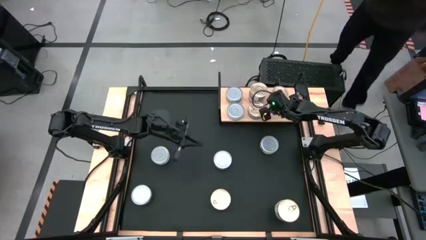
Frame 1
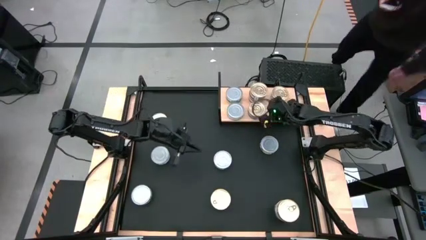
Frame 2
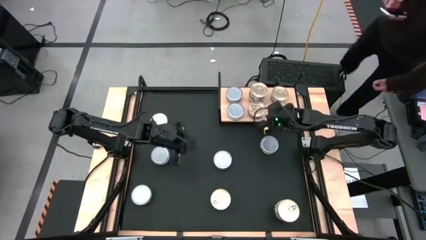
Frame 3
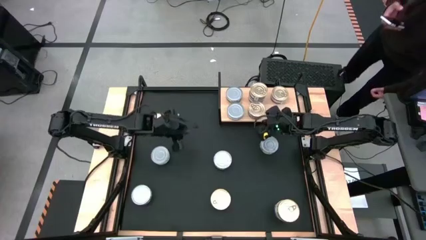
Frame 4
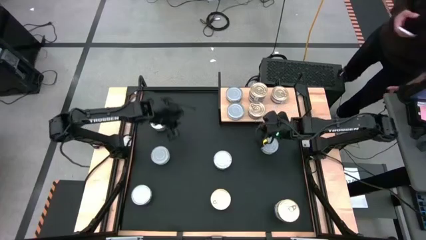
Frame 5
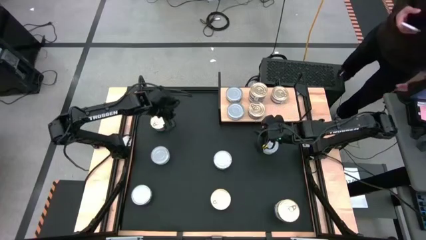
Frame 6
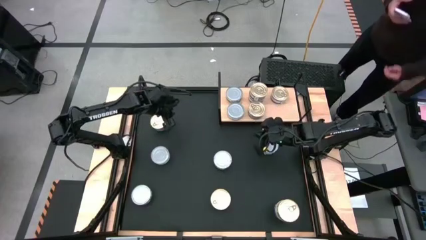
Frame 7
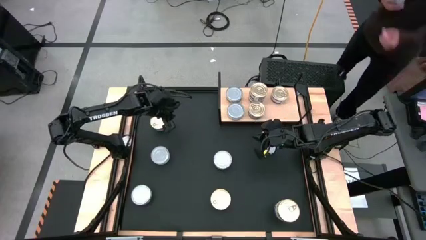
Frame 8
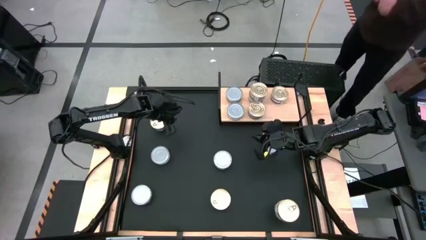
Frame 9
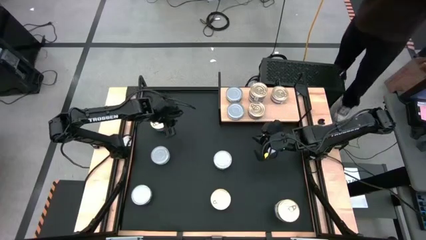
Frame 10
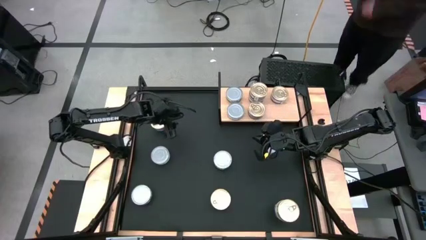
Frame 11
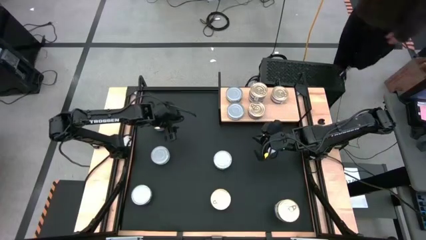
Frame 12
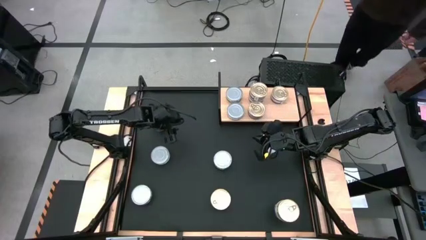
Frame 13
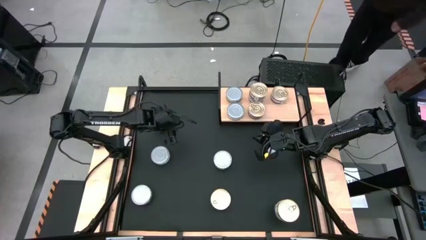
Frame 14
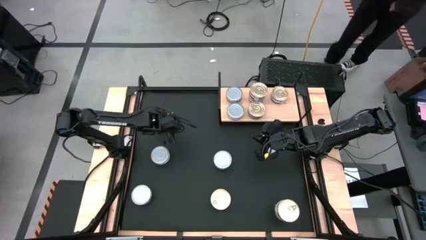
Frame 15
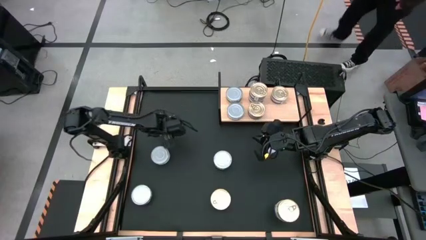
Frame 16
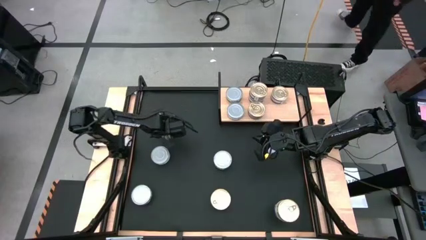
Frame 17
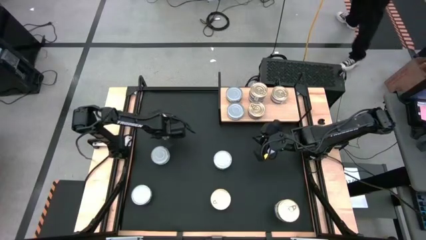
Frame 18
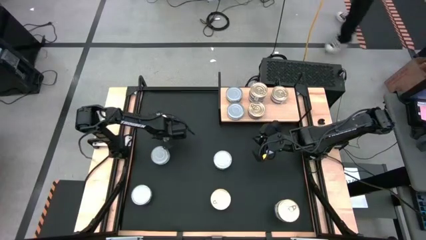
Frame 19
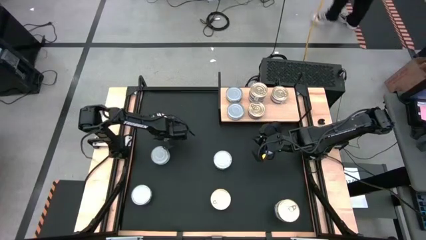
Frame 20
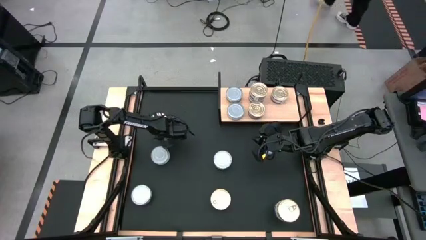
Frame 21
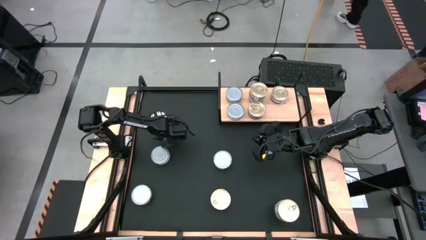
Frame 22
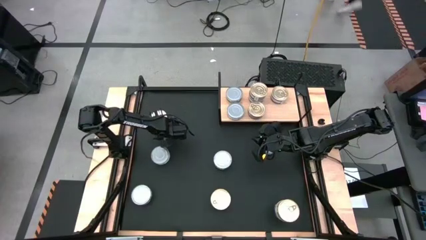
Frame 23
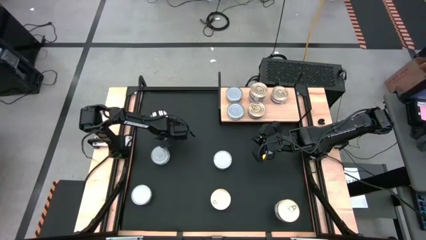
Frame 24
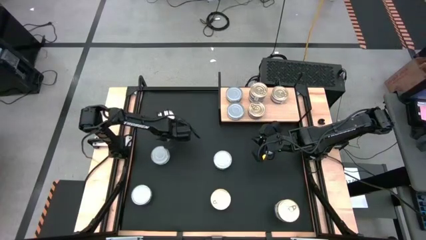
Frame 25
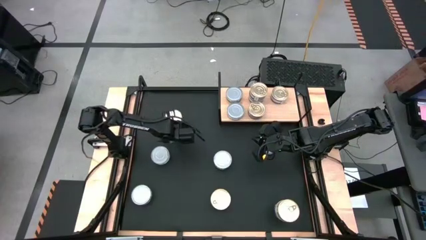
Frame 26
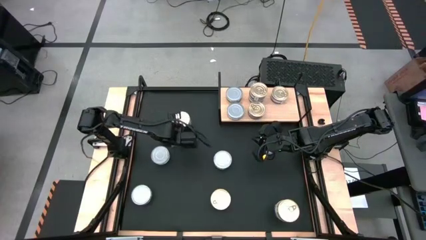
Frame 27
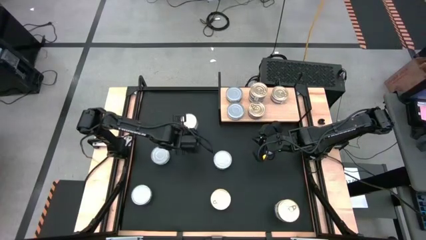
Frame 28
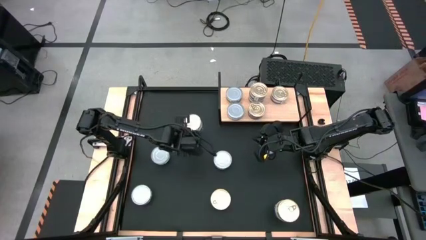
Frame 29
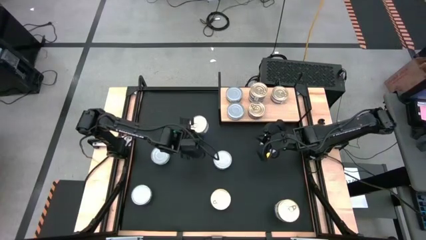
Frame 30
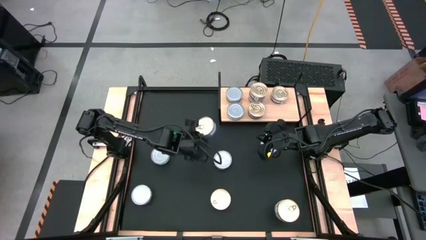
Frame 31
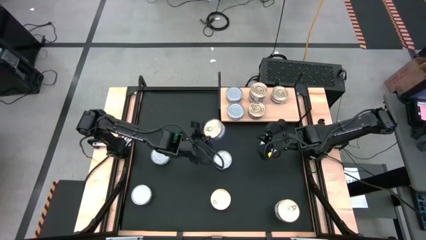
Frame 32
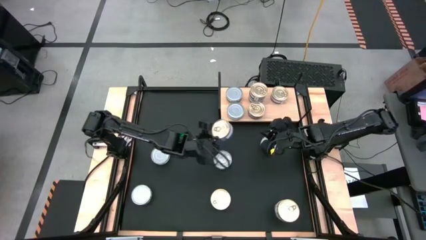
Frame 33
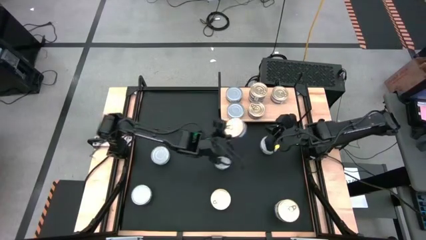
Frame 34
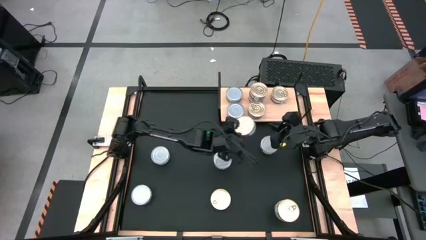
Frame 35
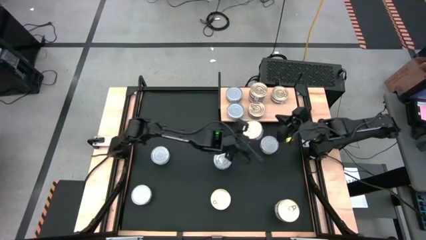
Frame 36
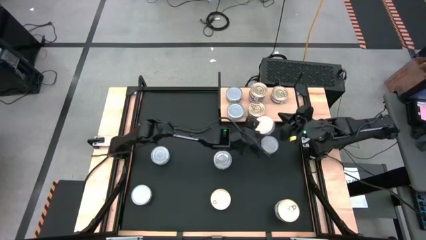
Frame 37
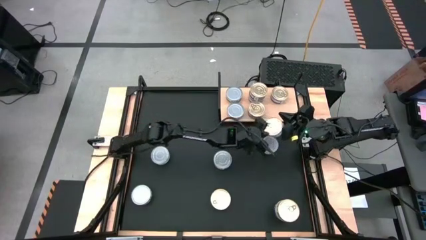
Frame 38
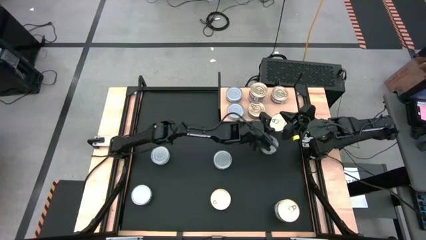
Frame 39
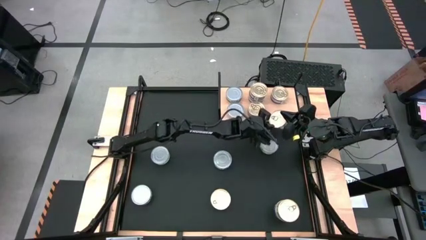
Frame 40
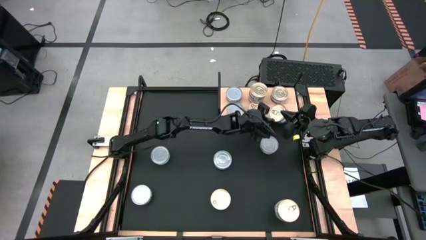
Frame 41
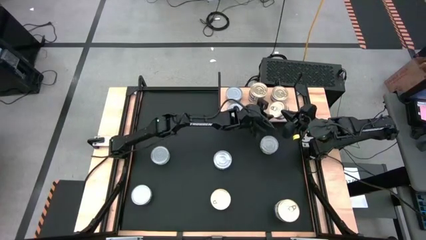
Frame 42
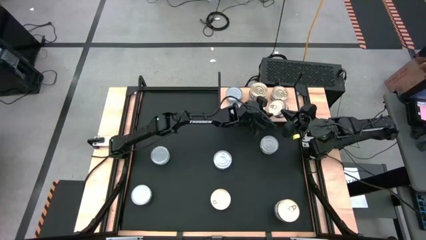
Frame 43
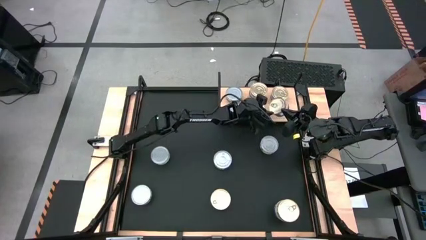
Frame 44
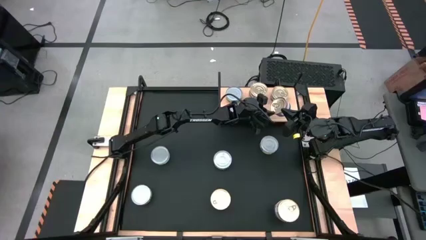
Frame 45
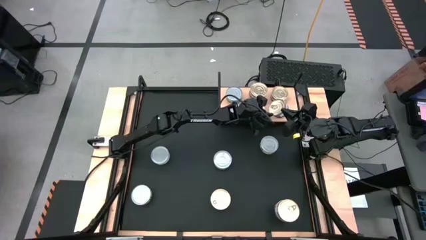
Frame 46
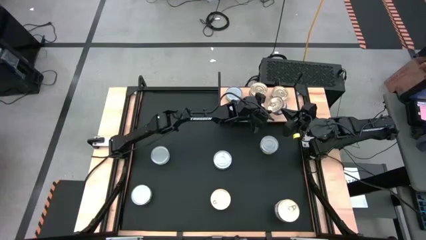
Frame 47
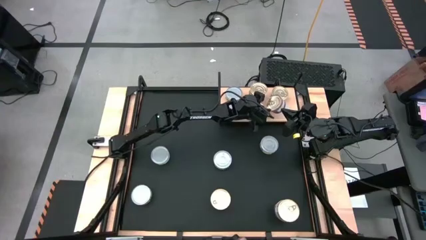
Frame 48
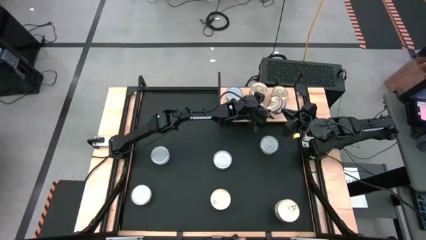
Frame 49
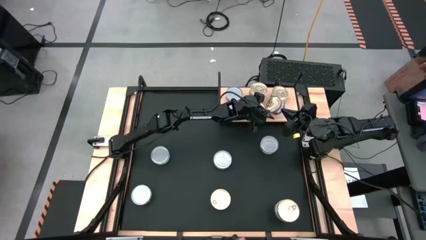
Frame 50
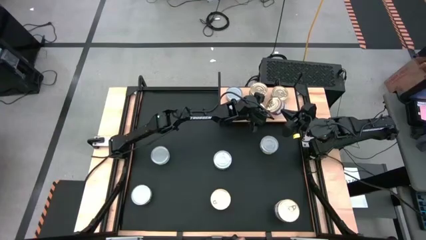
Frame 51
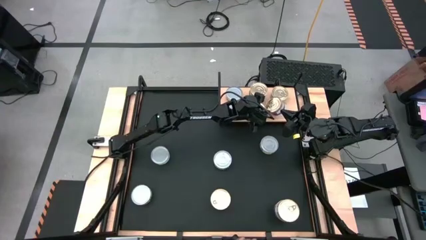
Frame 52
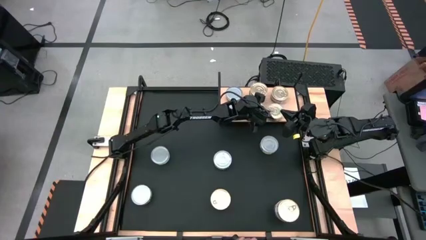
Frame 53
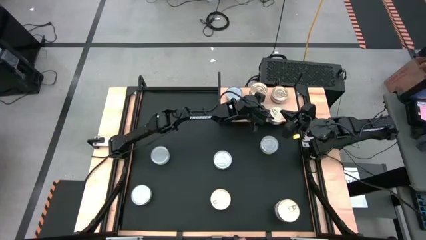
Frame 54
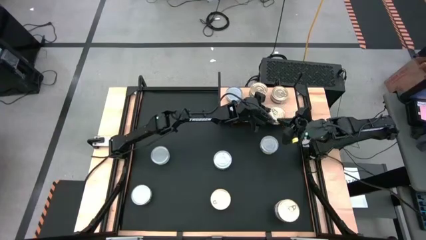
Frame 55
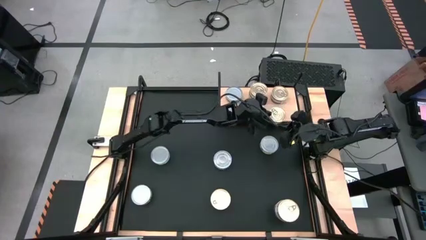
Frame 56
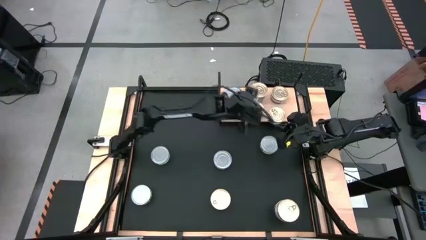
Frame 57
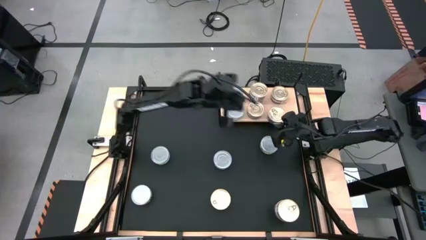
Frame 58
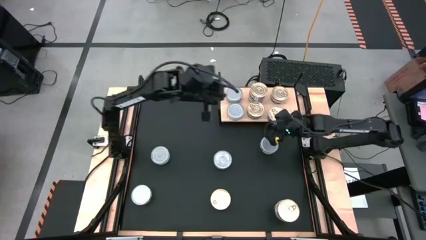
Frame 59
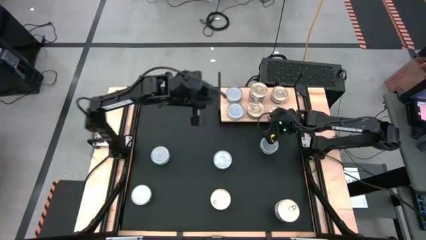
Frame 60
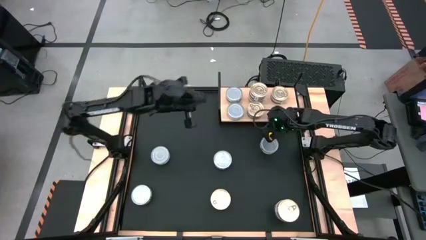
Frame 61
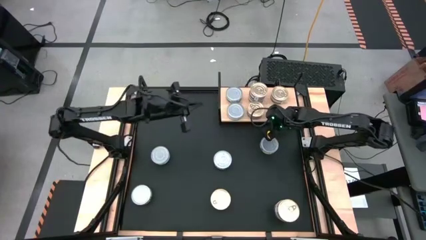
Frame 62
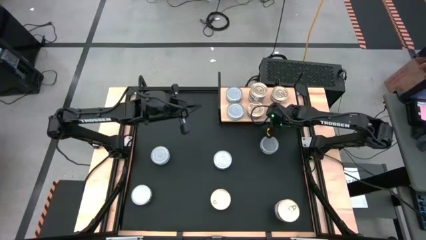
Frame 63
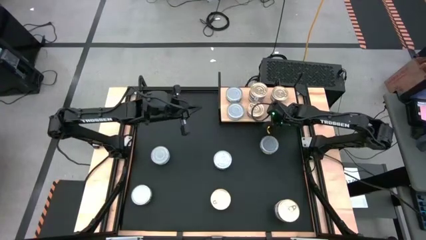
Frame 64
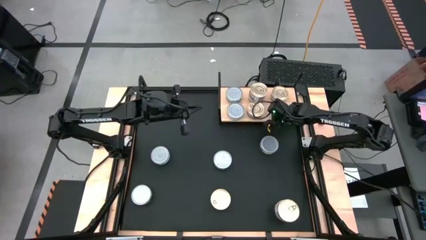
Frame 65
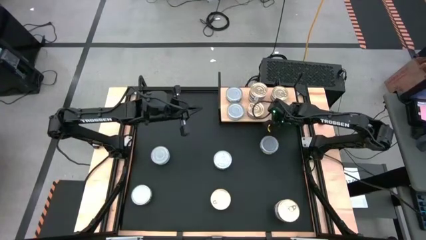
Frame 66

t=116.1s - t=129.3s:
Task: Stack canned seafood by type on shelf
Put the blue pink tuna can on the shelf

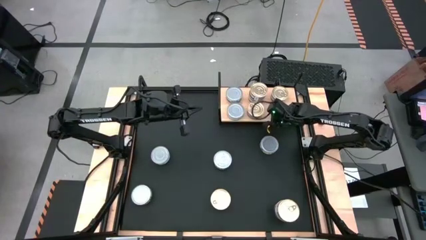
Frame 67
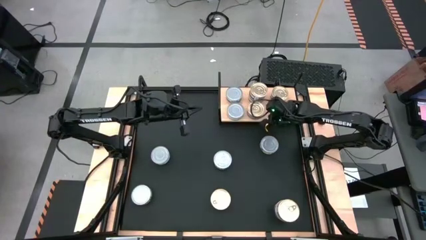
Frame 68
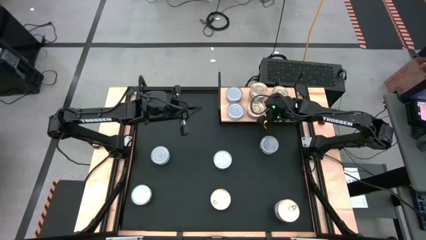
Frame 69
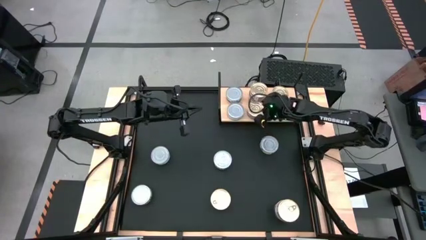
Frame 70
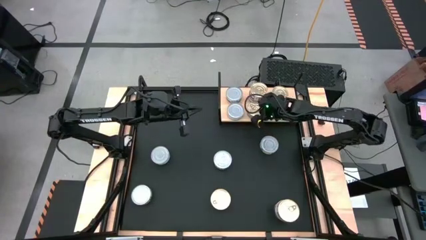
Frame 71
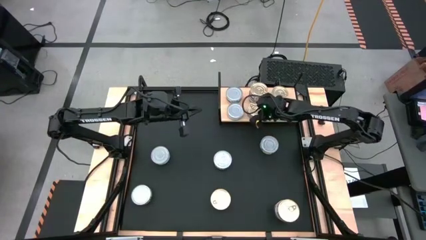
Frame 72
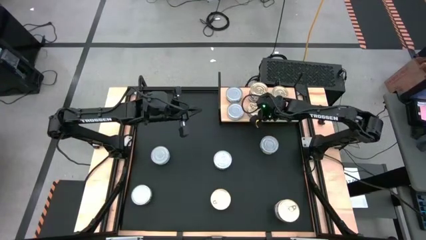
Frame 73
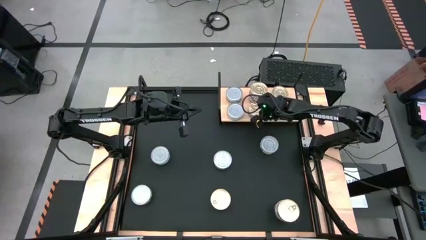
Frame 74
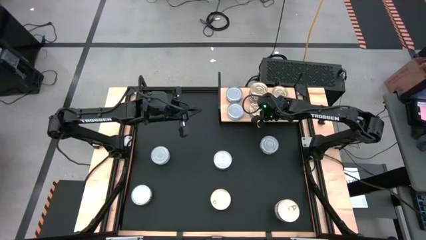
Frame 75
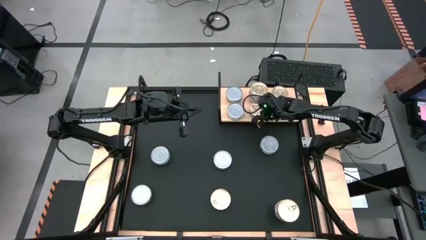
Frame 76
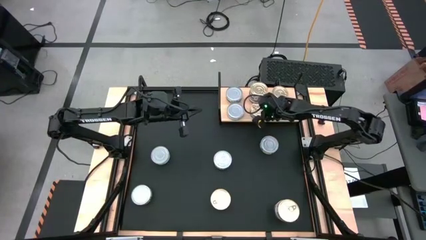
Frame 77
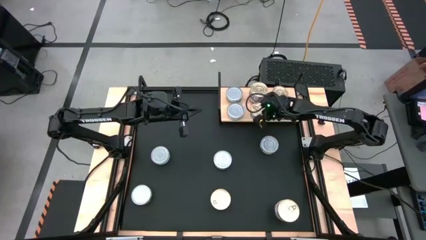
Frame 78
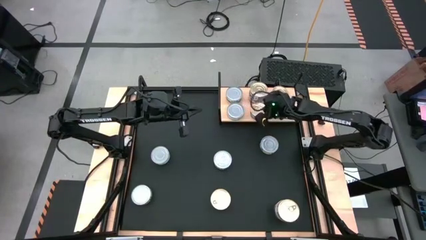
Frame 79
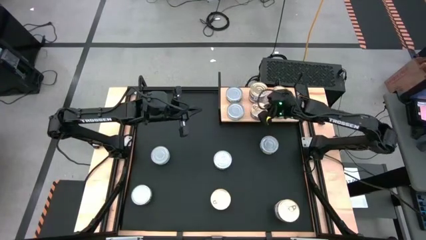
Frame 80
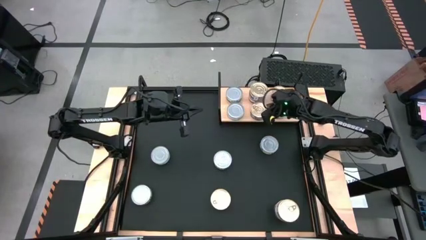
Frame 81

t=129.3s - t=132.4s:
Adjust the blue pink tuna can on the shelf
